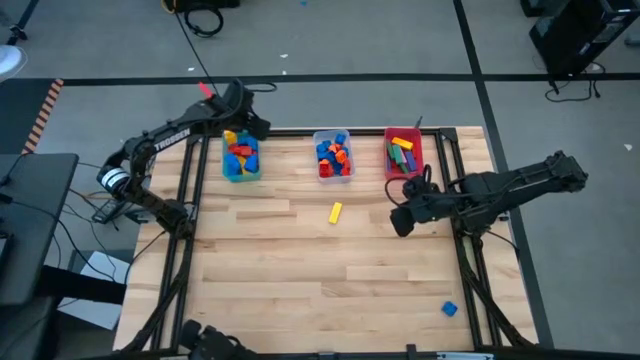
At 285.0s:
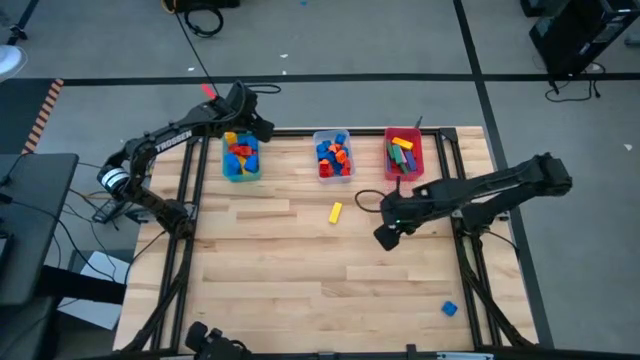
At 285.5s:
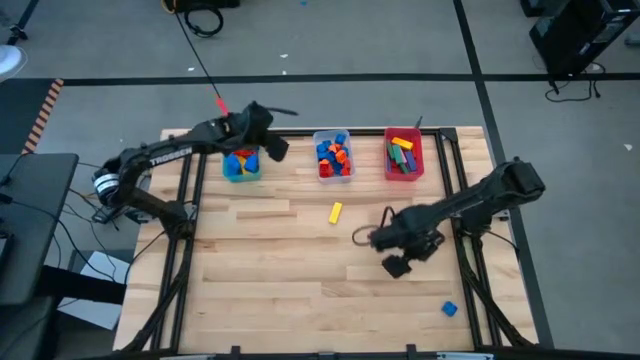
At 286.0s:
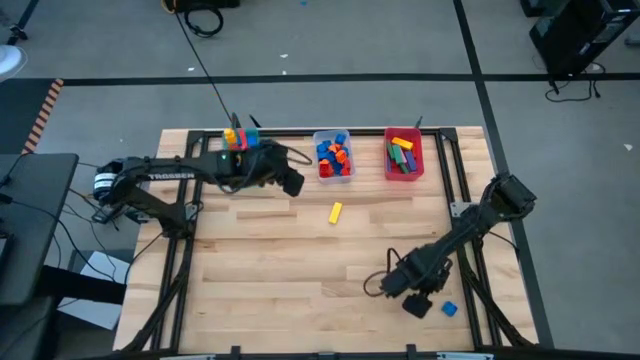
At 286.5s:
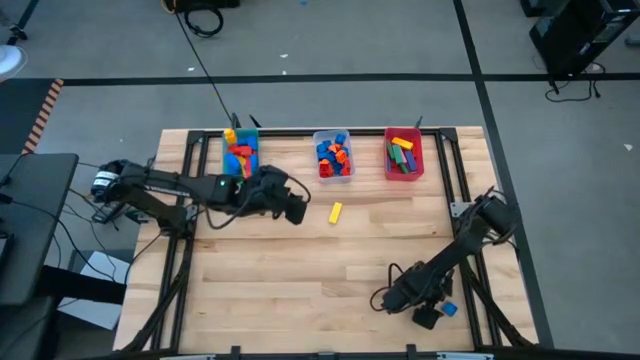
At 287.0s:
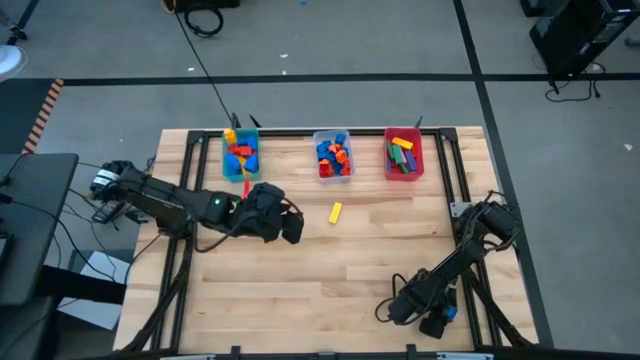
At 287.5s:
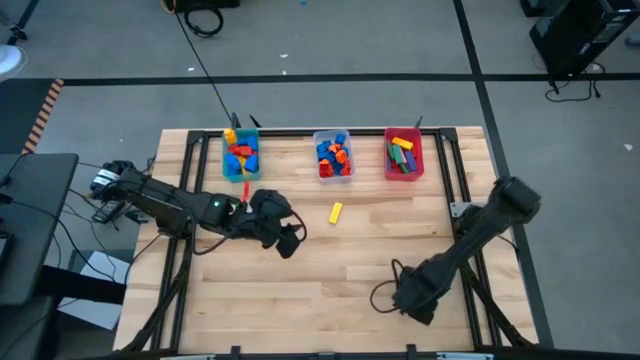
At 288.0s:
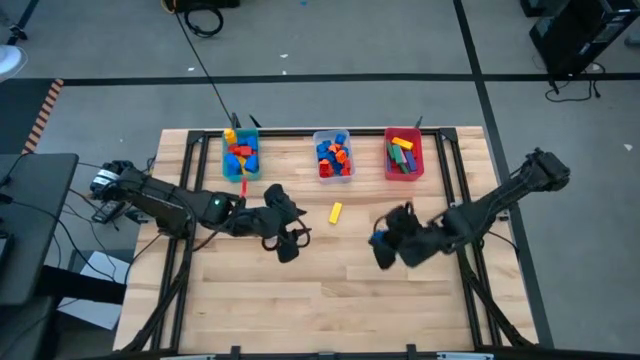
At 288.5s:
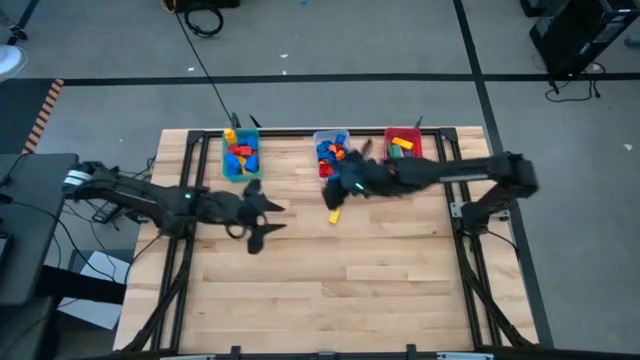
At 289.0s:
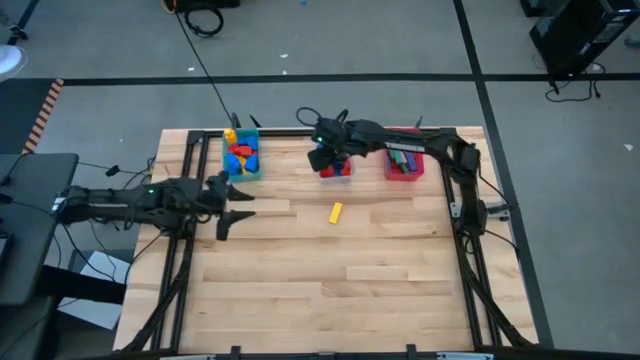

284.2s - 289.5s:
Task: Sort blocks by size
Put the blue 4 stud game piece into the transparent bin

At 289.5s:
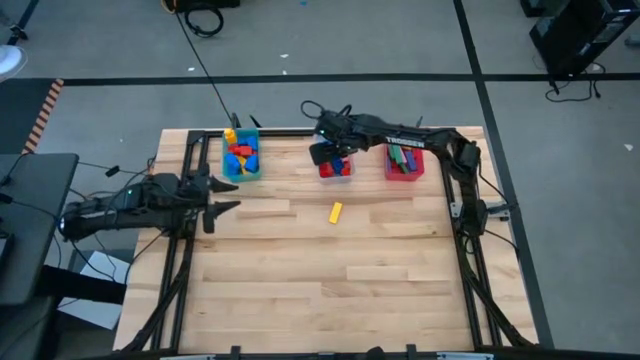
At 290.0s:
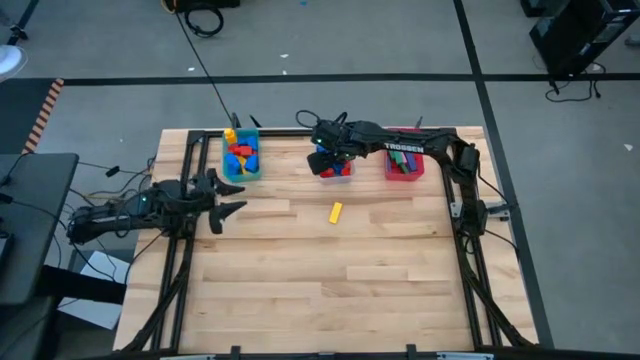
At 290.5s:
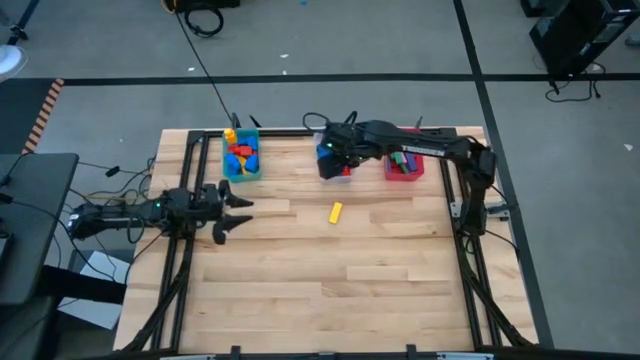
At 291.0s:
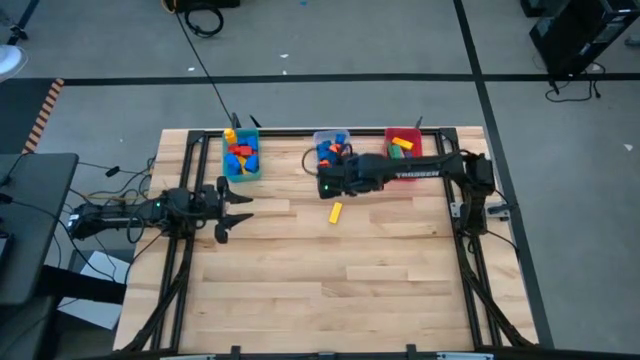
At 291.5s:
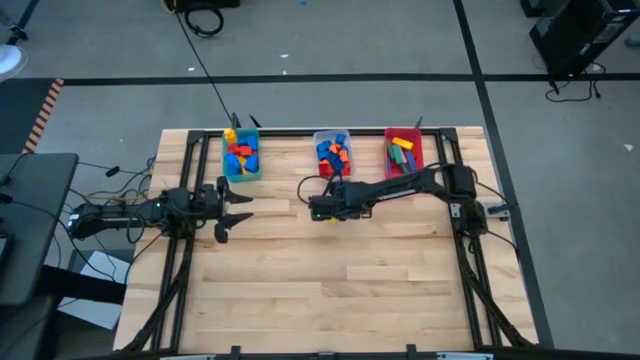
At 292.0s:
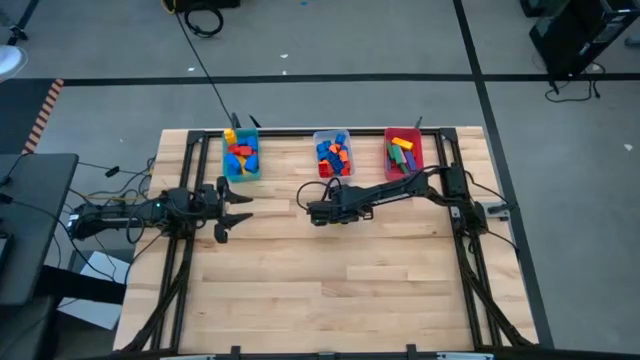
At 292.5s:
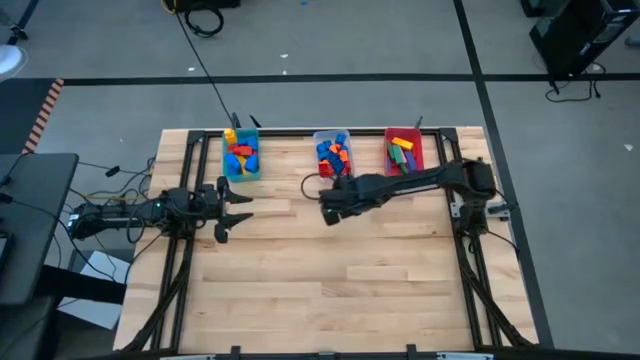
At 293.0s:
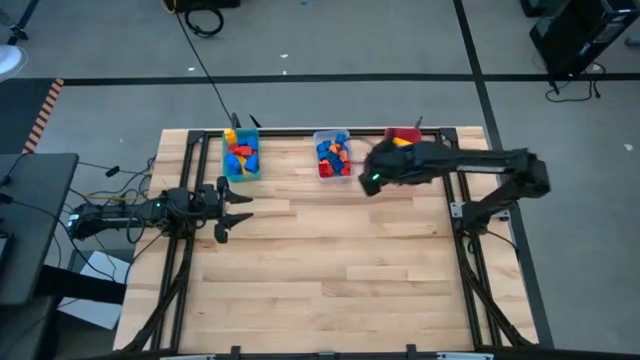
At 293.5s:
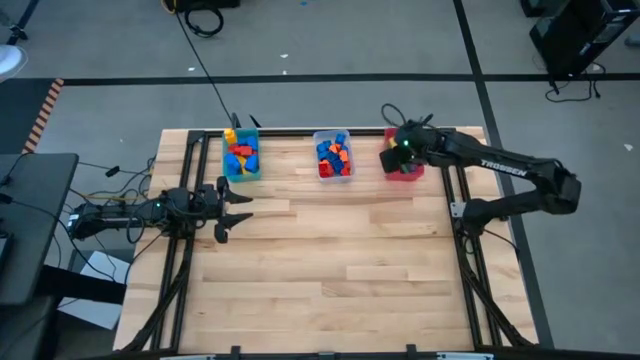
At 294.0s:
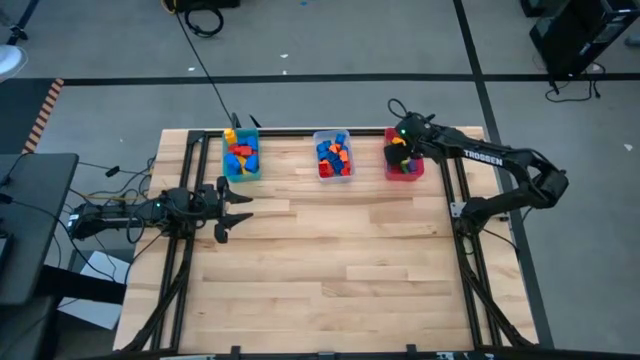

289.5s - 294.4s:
Put the yellow block into the red bin

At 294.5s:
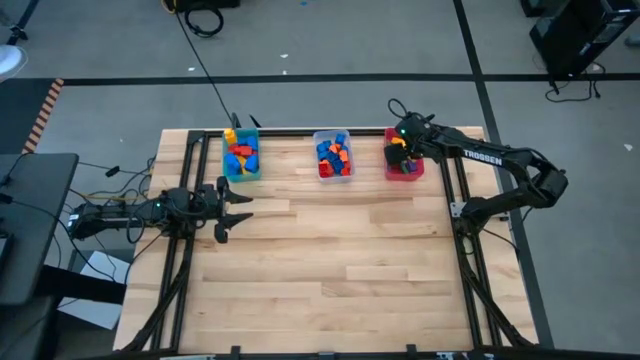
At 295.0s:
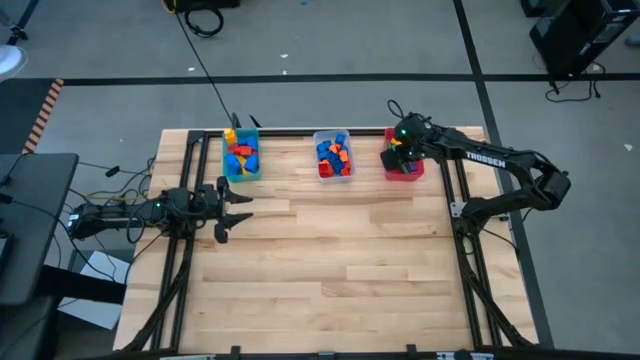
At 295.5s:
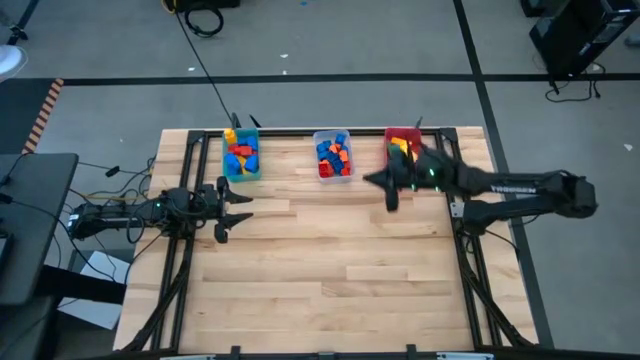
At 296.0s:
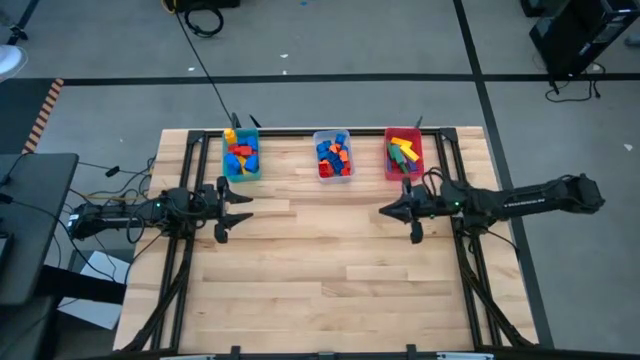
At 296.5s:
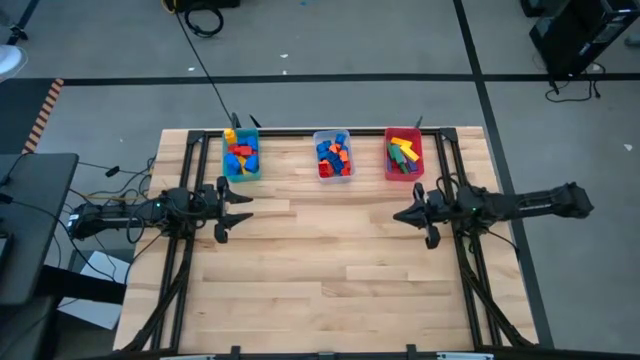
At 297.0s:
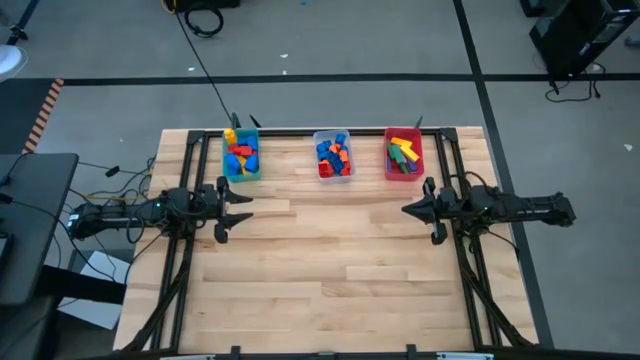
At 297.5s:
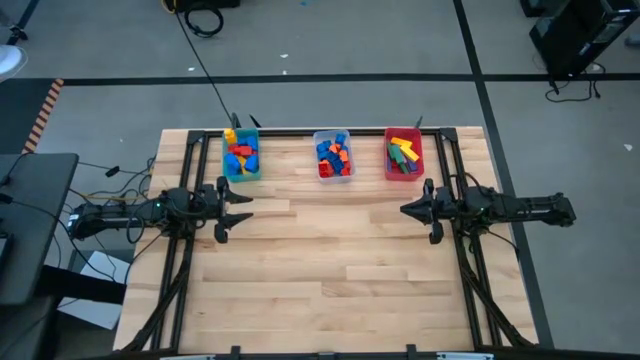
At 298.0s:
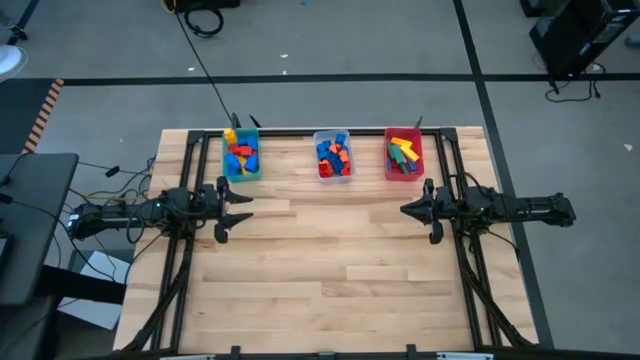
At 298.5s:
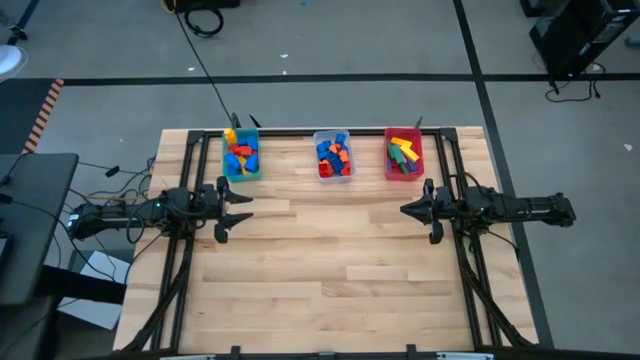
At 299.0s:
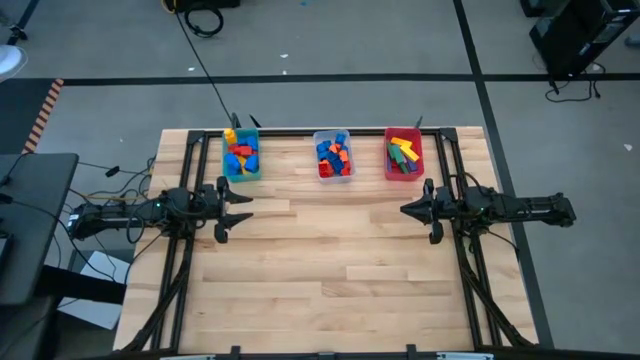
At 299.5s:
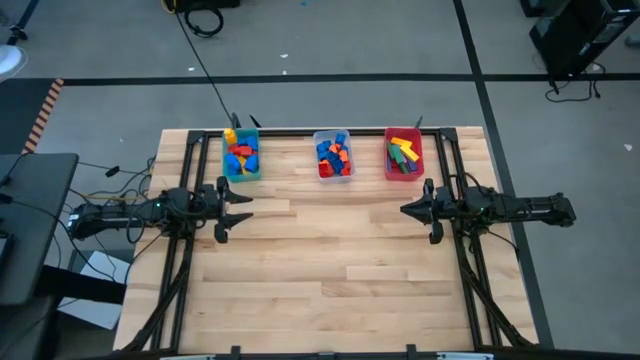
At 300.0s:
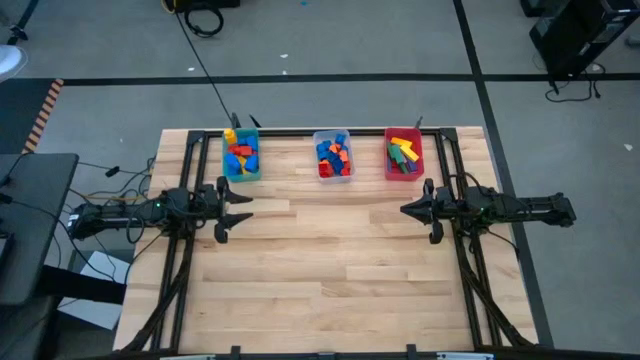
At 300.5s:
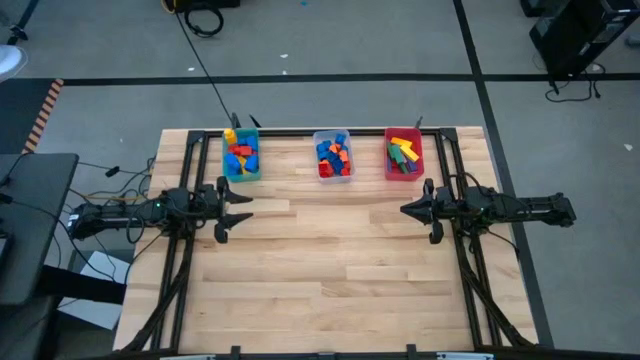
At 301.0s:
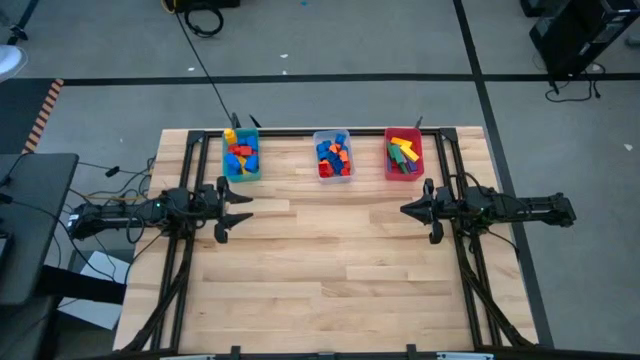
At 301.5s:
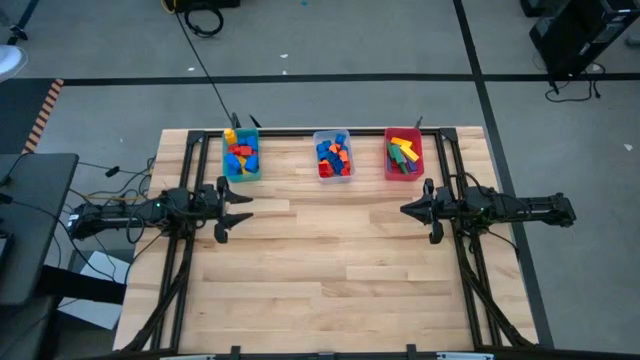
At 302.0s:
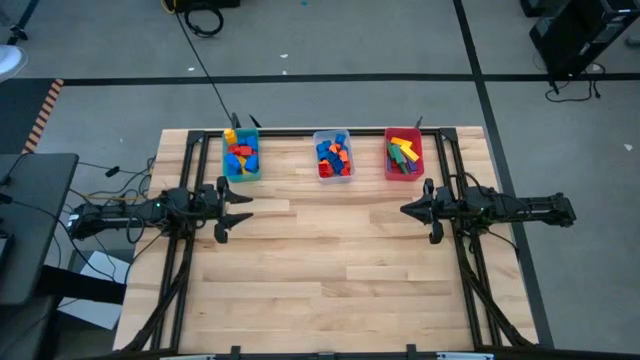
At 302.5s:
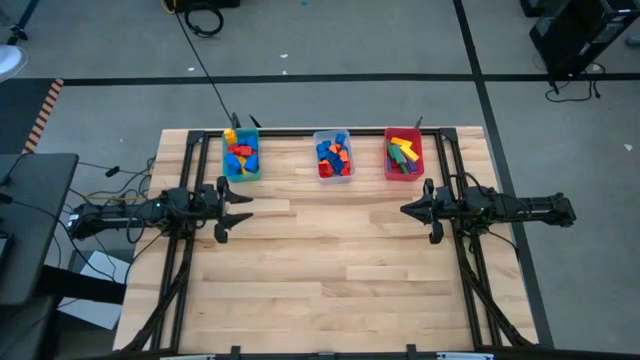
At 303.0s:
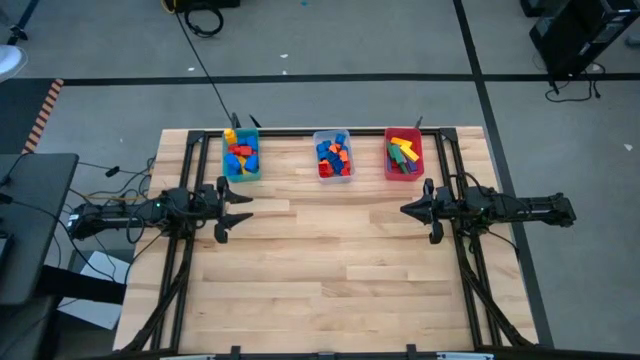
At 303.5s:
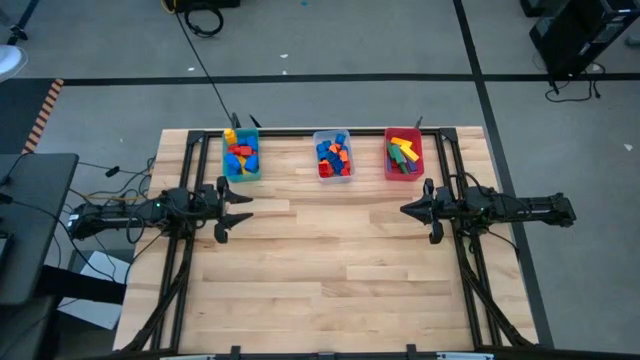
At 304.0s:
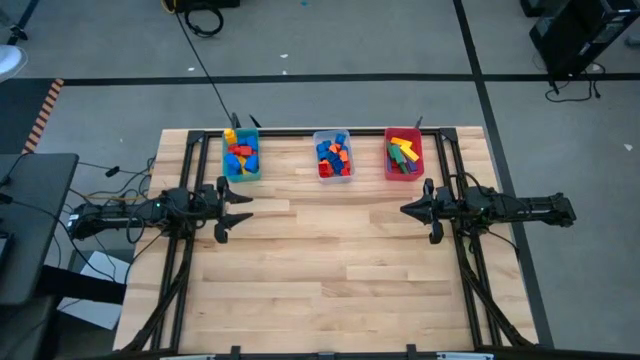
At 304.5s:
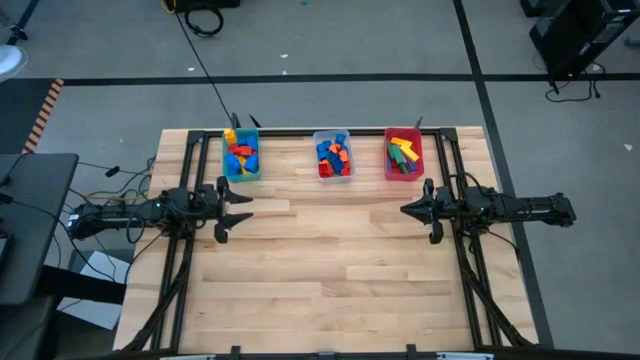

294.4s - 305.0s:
Return to Home Position

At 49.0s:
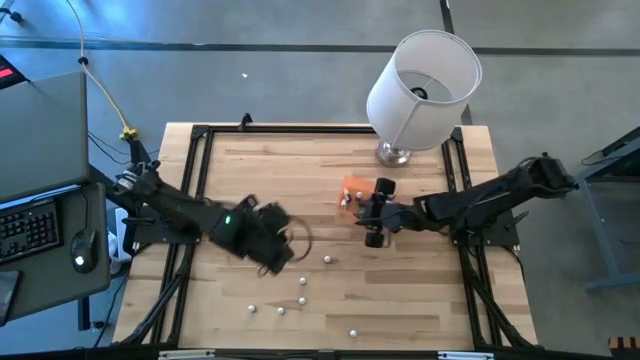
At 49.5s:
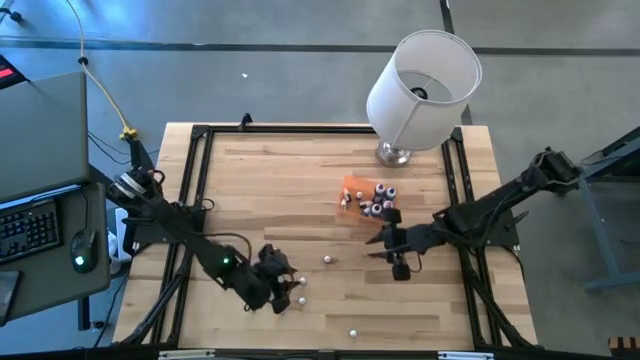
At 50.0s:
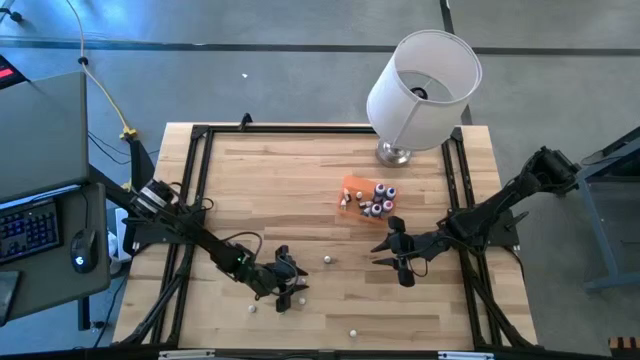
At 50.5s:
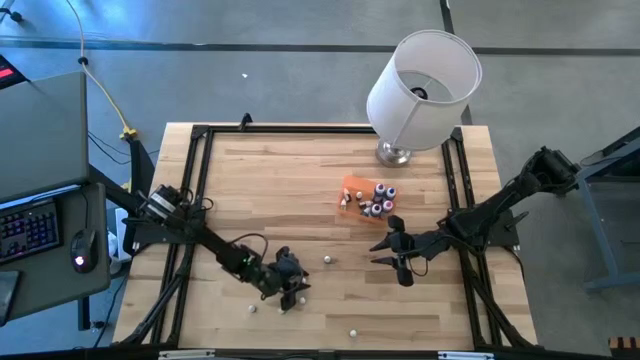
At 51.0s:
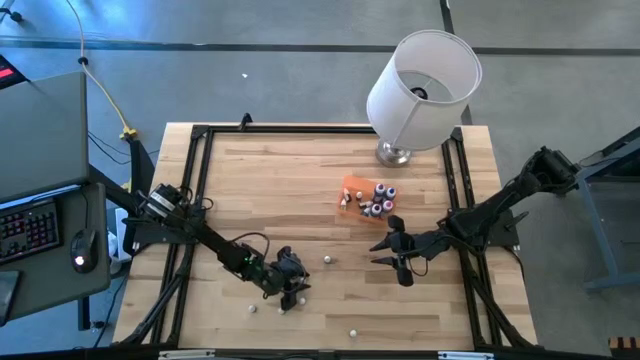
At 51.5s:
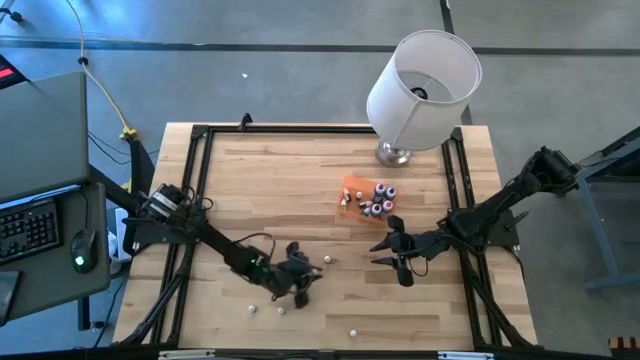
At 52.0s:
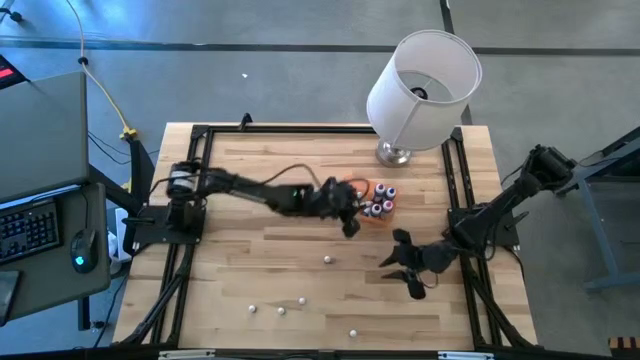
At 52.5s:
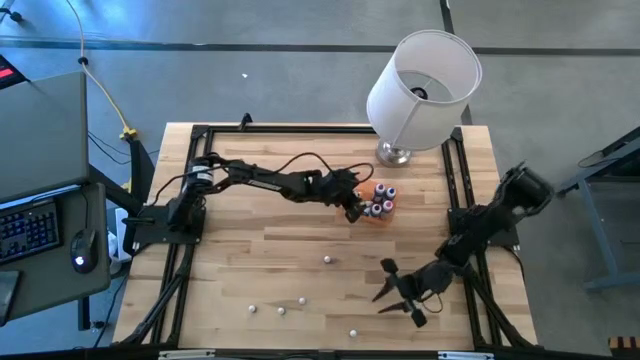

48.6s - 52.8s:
Task: Pick & Place food coloring
Put the top small red food coloring bottle into the orange container
